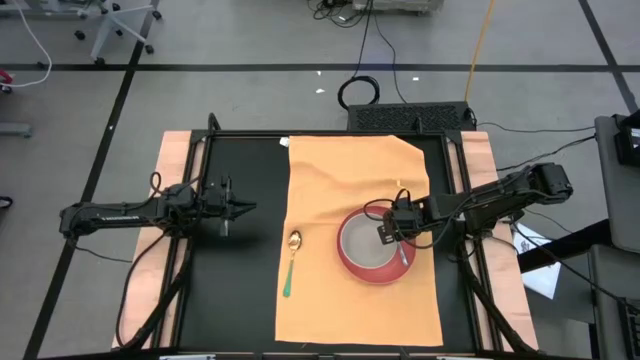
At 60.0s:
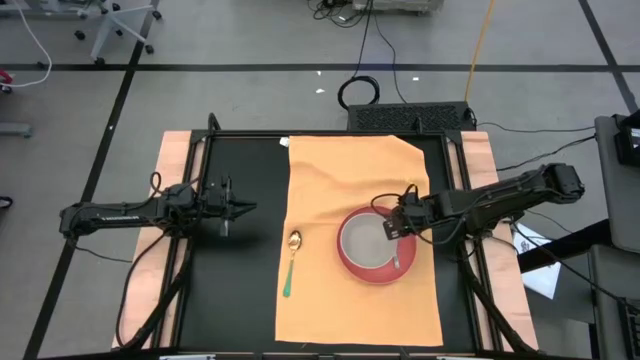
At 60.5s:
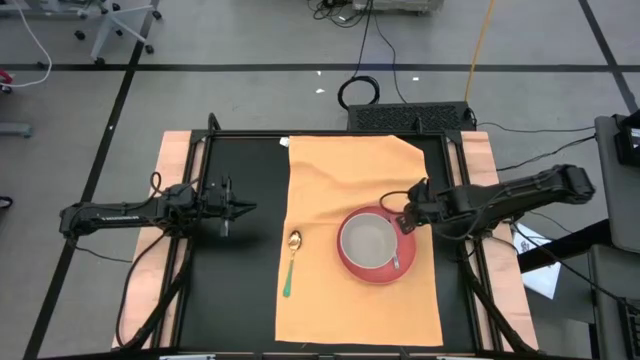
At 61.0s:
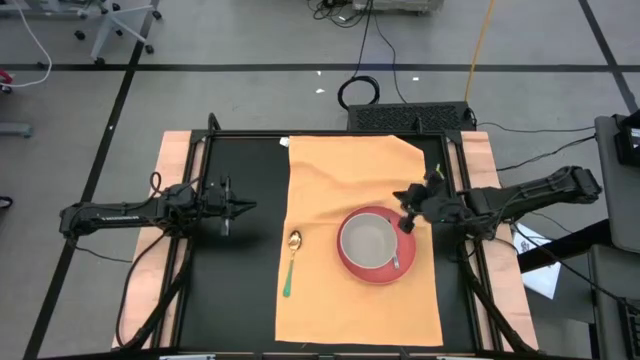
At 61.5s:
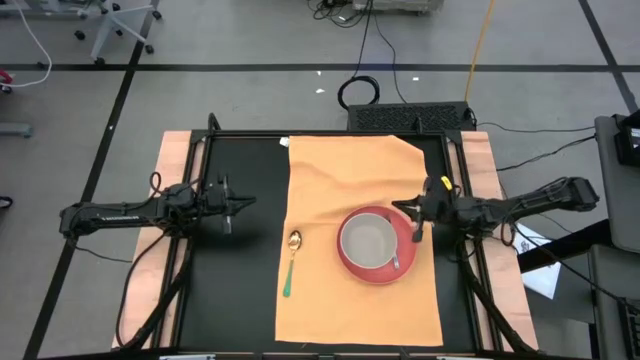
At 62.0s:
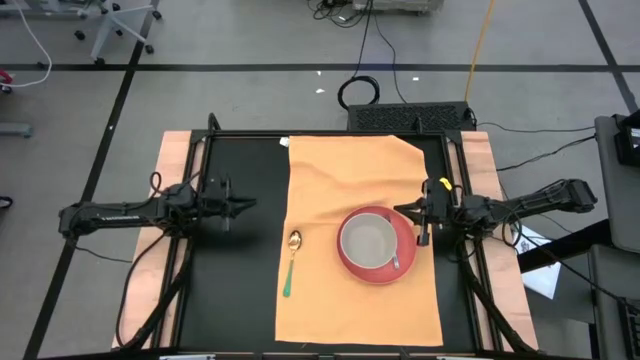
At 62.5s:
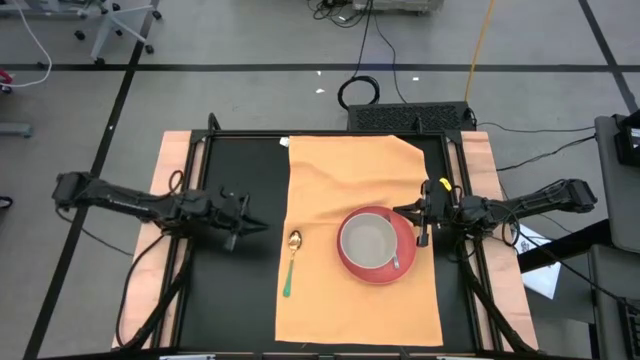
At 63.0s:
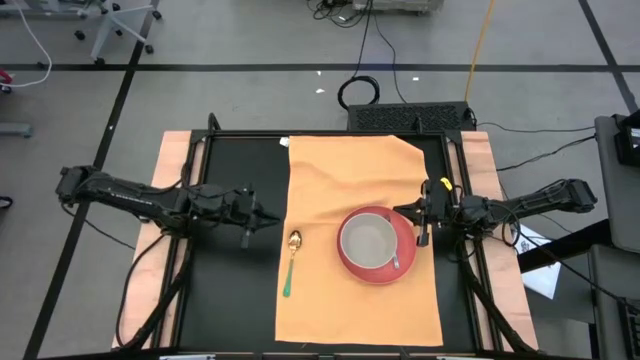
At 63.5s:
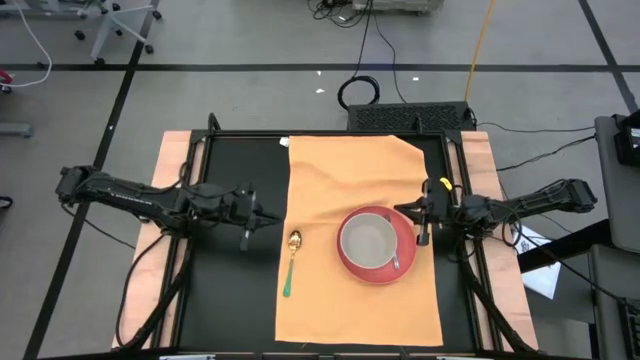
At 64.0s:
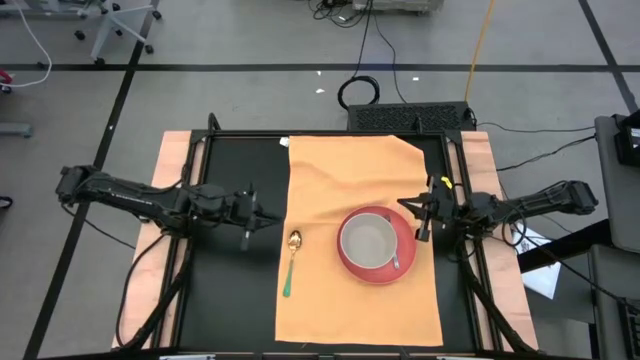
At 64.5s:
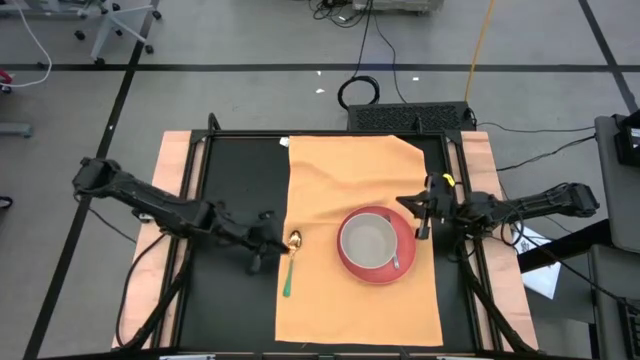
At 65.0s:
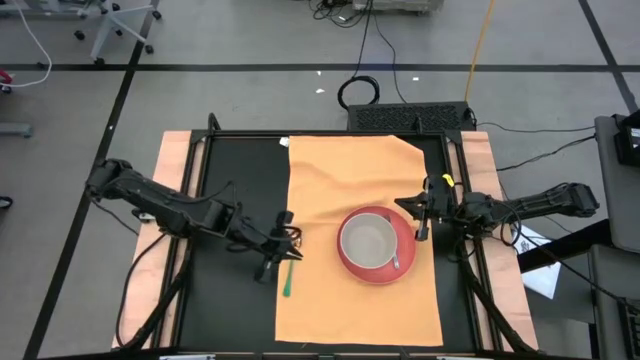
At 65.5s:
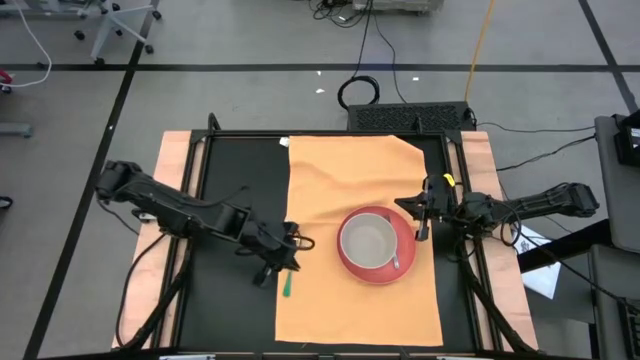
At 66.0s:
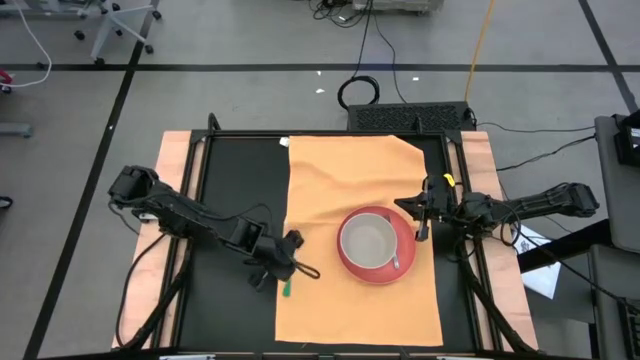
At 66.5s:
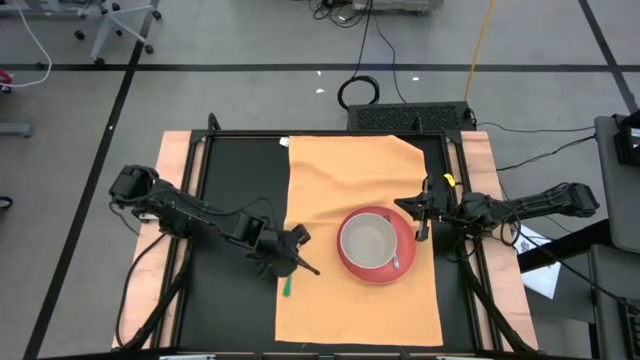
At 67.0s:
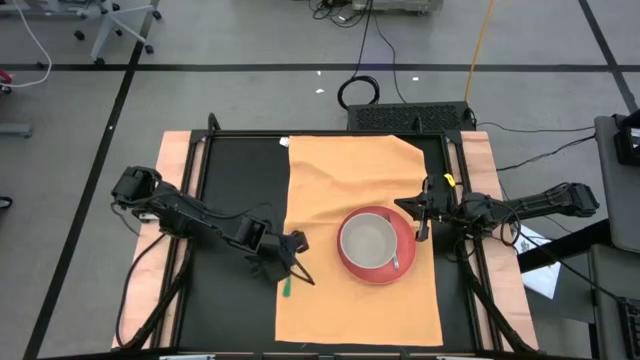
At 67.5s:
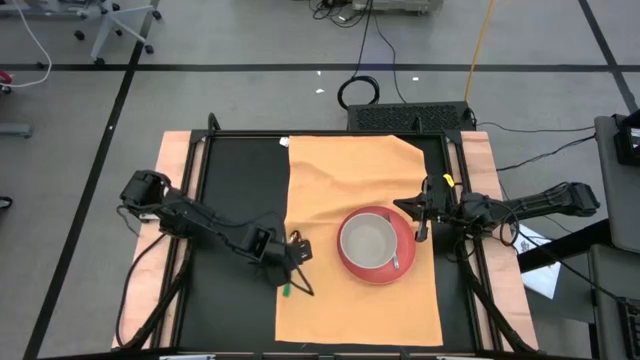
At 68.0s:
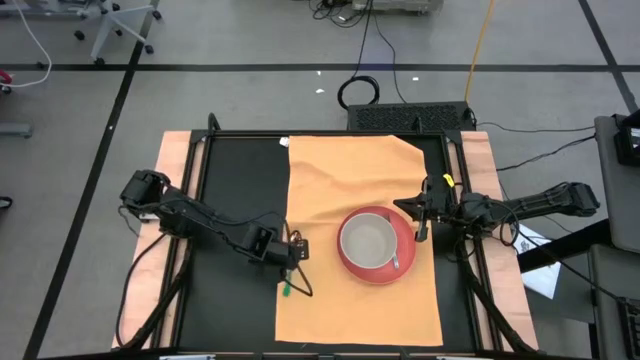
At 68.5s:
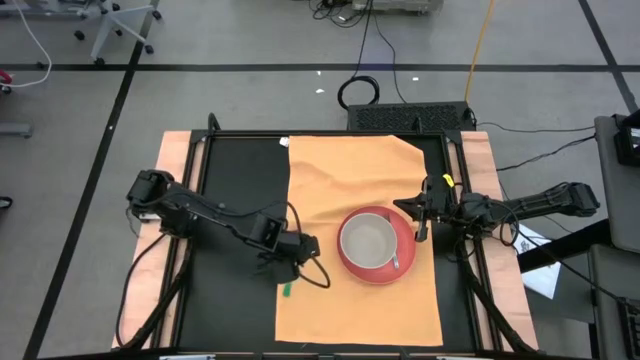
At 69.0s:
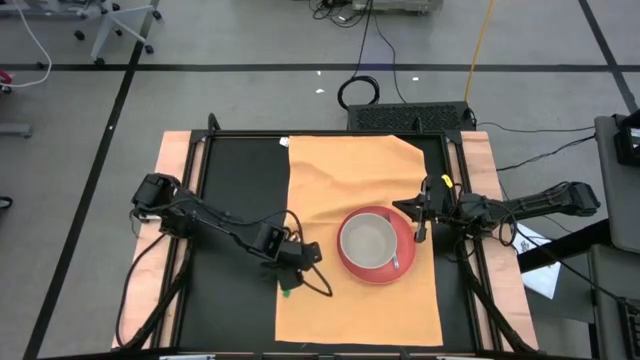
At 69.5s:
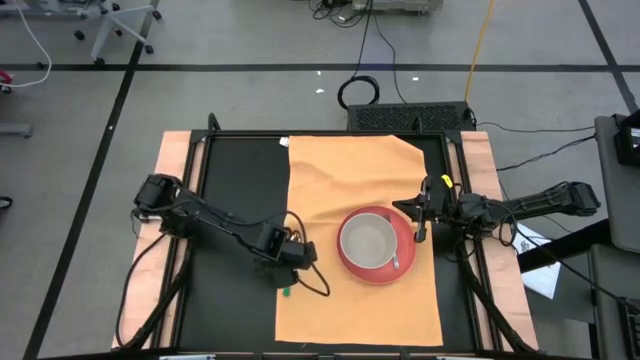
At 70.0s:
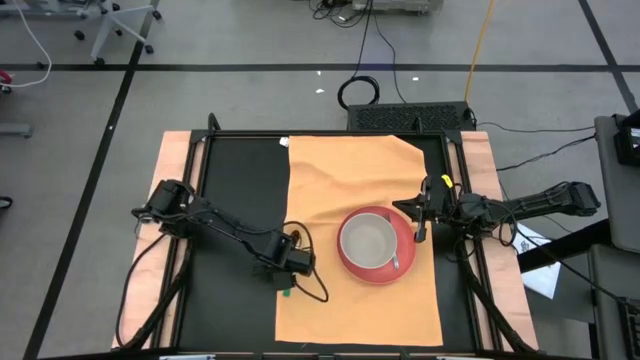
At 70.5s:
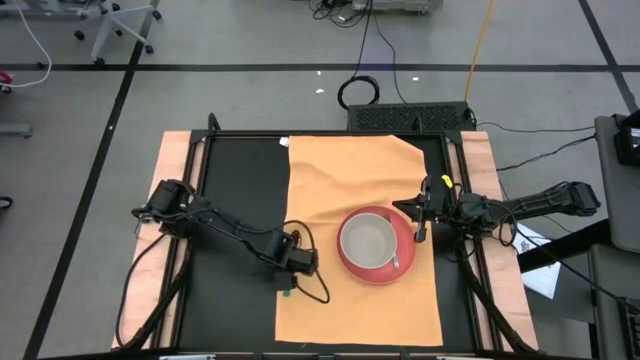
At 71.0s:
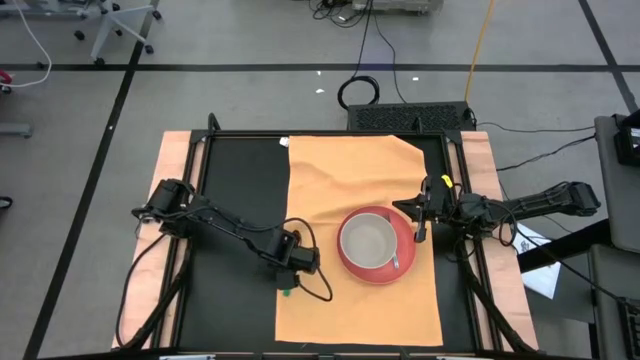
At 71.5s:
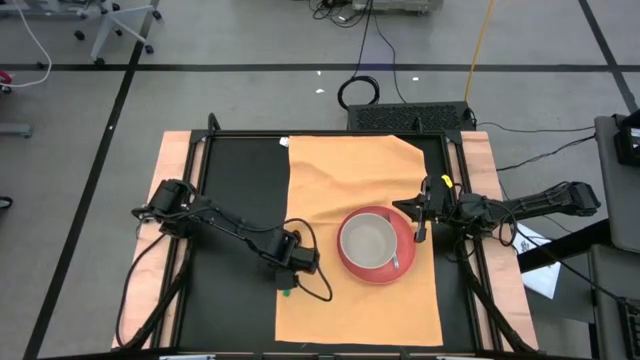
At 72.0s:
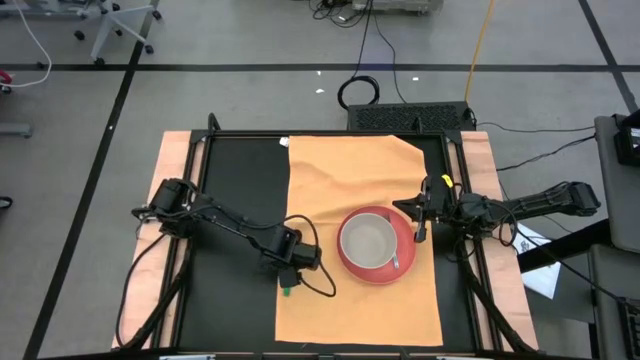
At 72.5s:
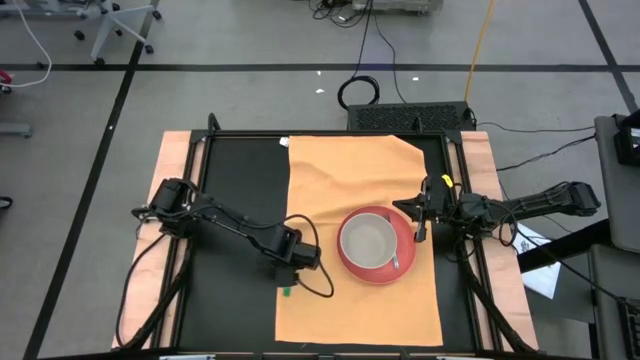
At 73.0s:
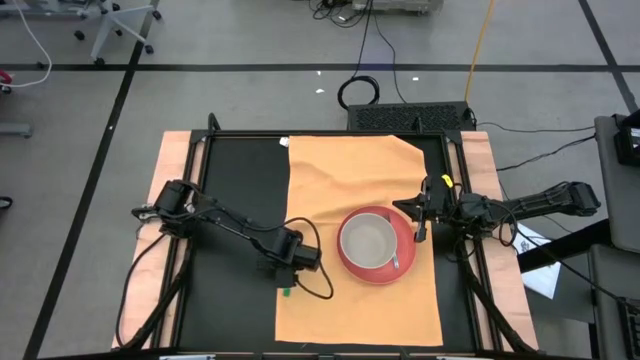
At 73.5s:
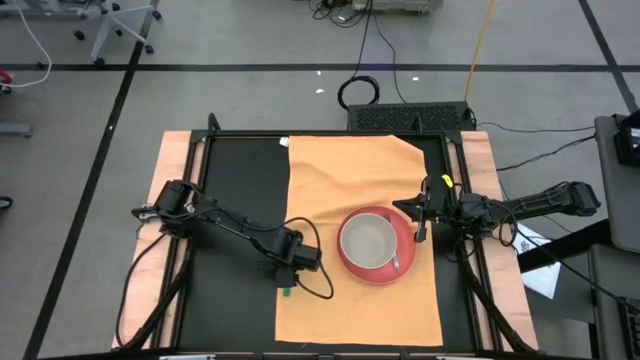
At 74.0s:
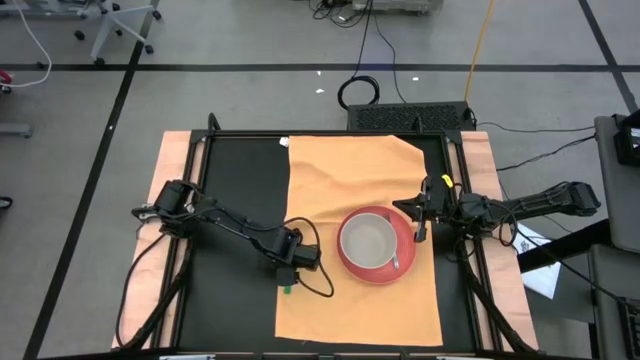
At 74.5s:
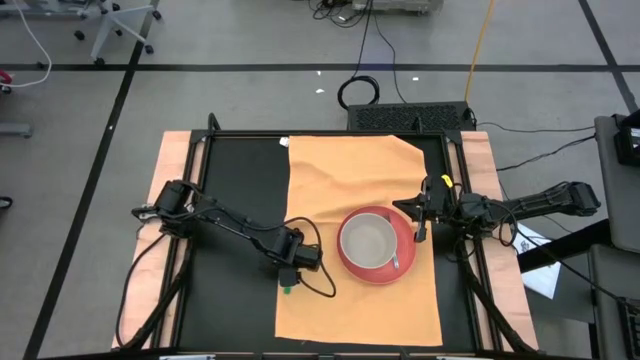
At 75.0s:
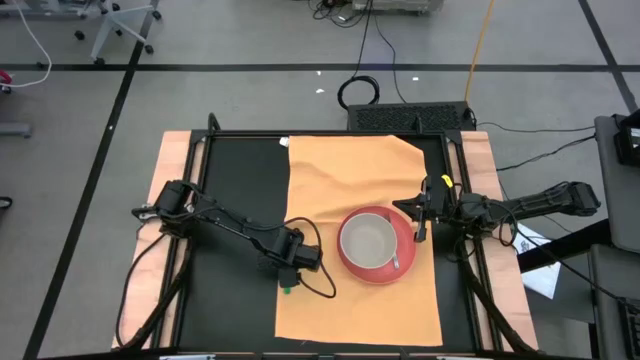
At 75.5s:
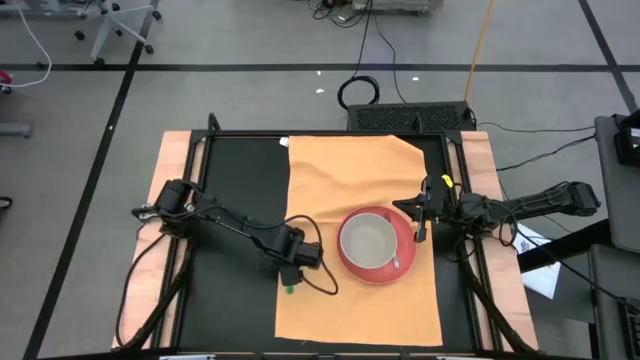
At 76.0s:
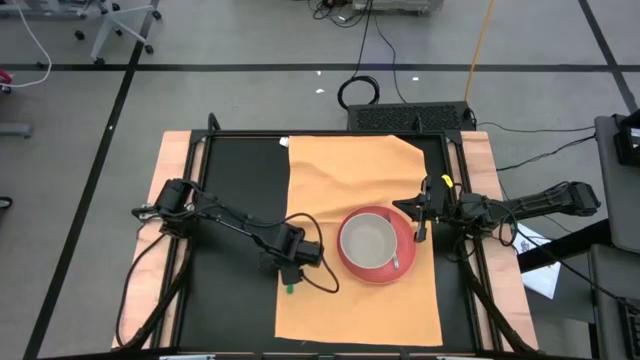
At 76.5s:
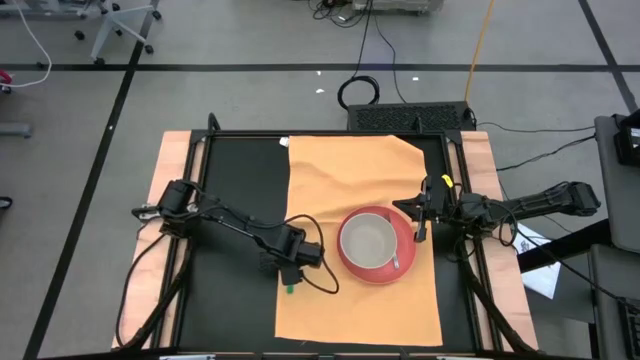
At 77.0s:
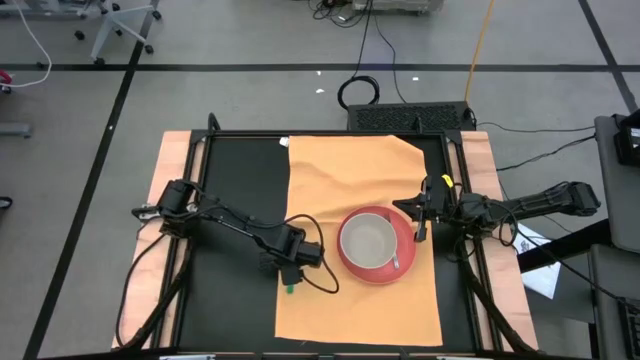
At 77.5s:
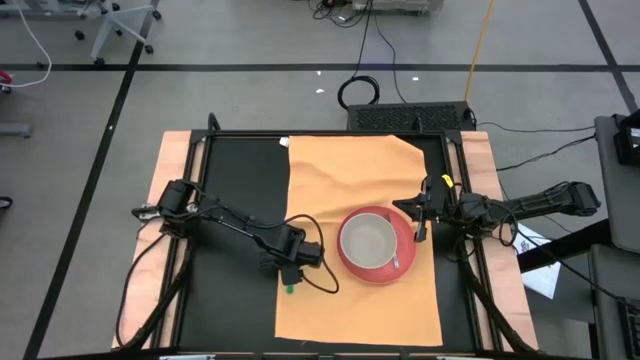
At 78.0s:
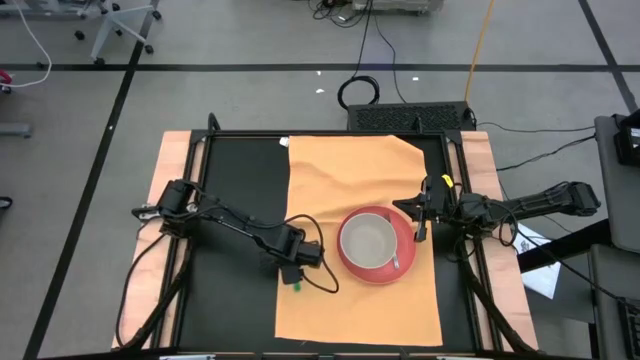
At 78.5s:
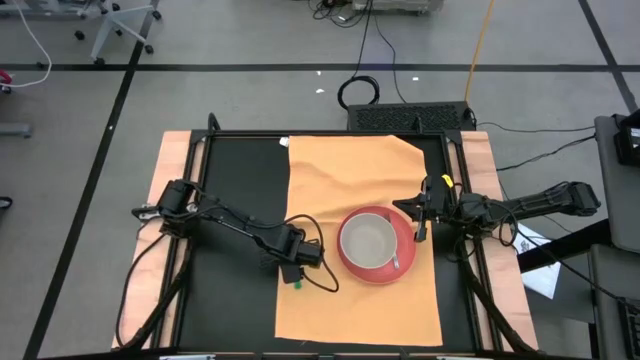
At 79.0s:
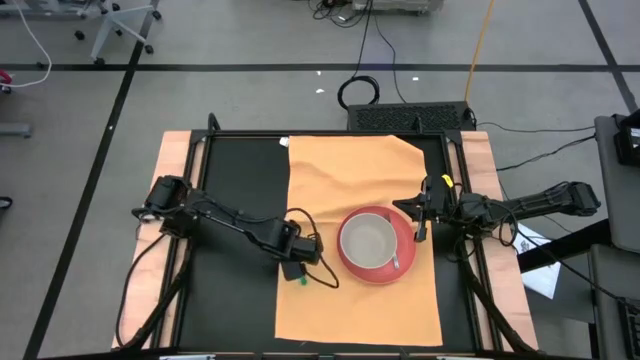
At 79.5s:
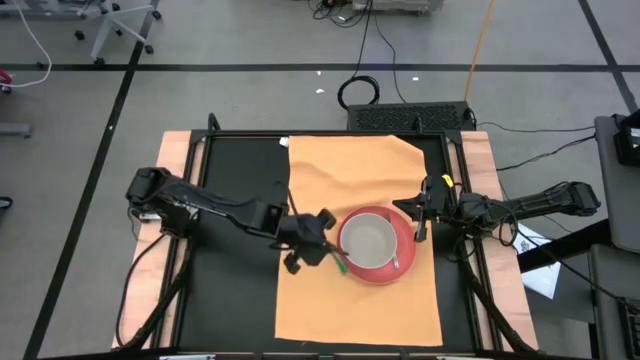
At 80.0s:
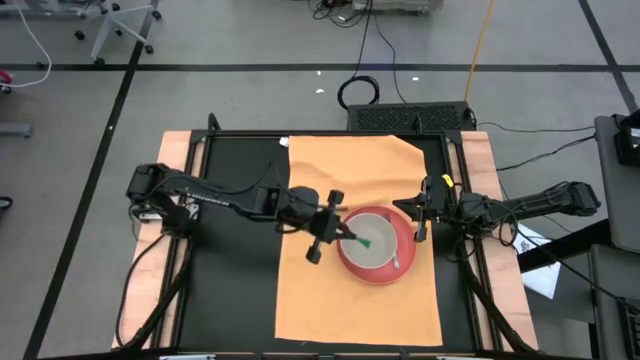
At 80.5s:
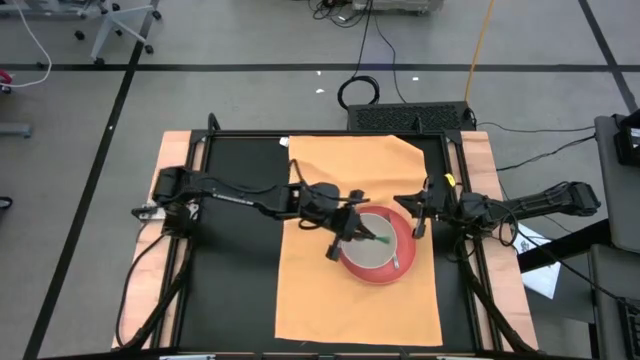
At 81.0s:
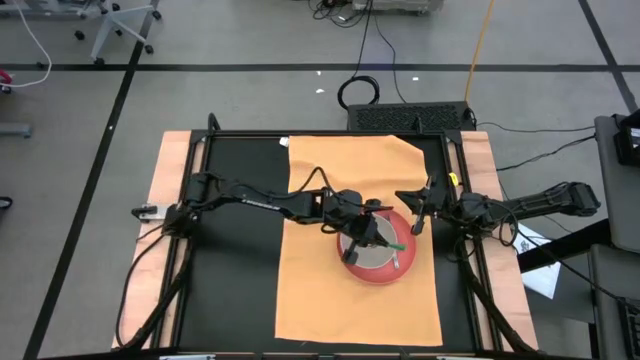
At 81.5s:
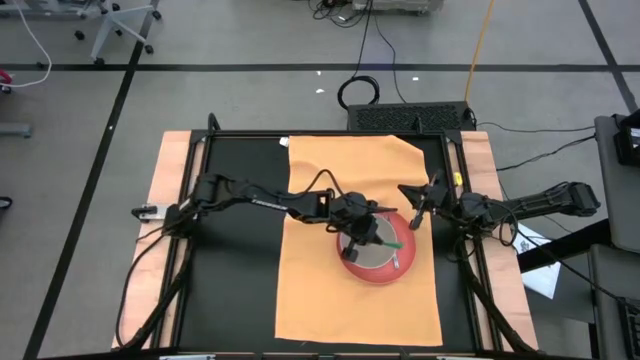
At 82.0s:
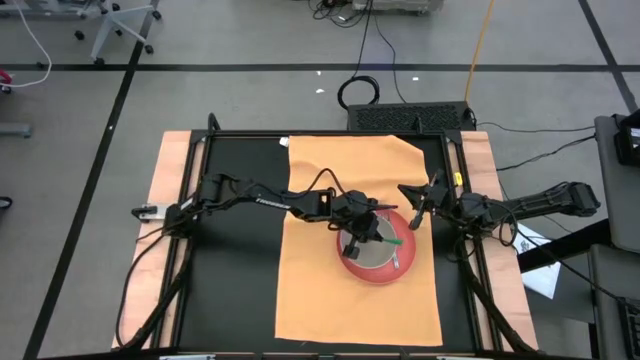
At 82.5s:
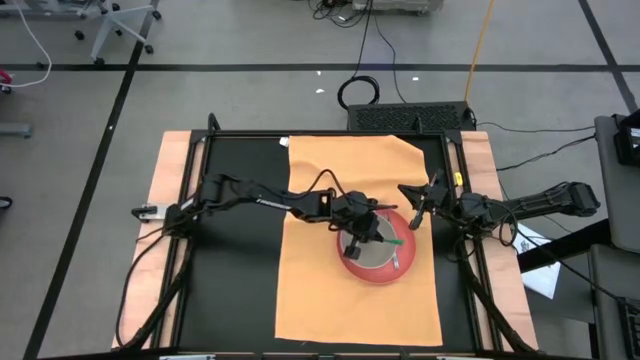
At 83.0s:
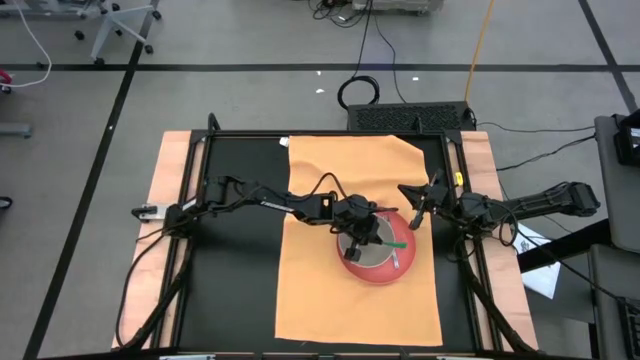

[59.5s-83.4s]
Task: Set table place
Put the spoon into the bowl on the napkin
